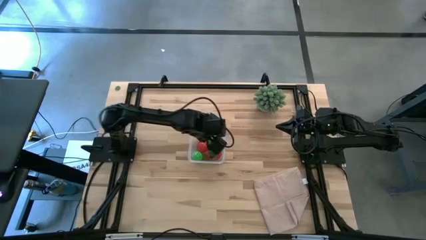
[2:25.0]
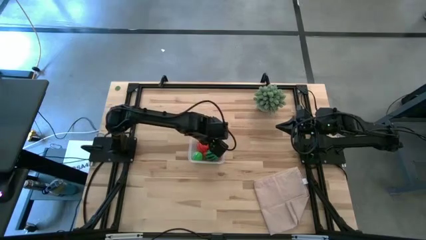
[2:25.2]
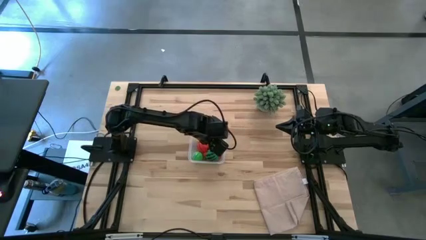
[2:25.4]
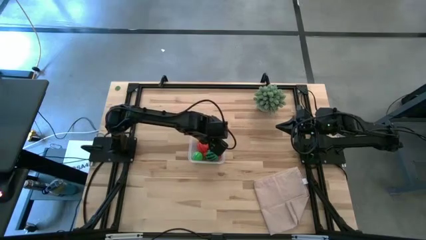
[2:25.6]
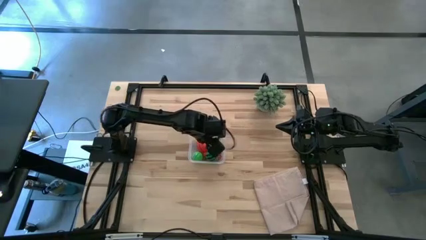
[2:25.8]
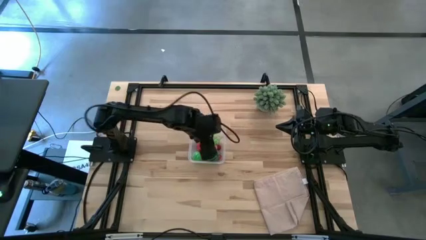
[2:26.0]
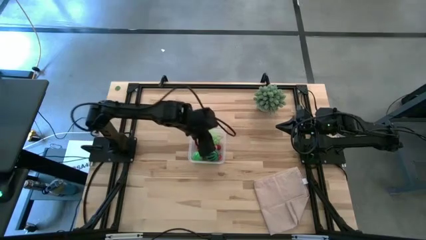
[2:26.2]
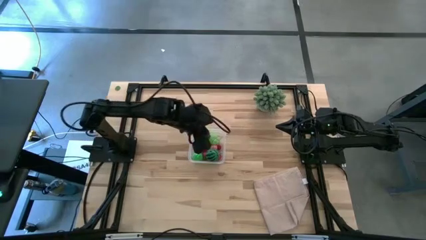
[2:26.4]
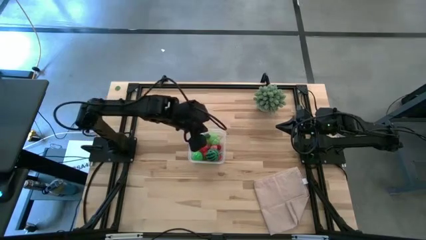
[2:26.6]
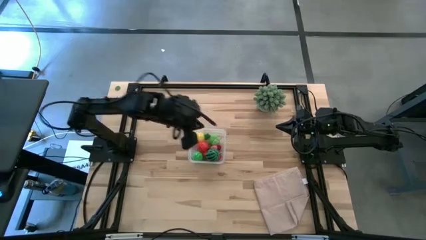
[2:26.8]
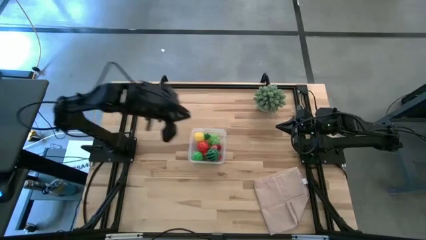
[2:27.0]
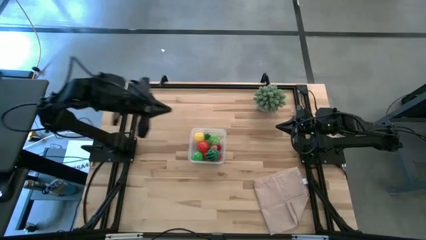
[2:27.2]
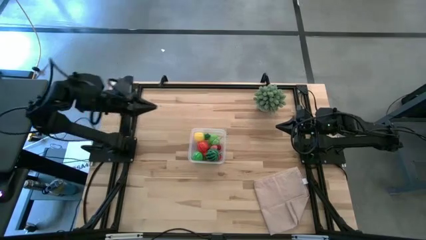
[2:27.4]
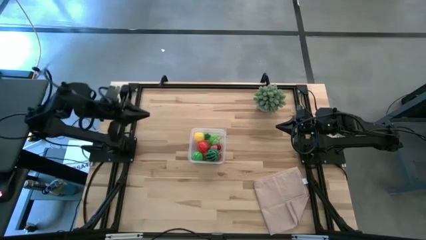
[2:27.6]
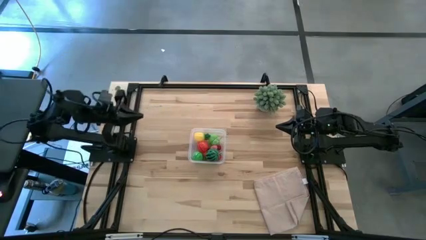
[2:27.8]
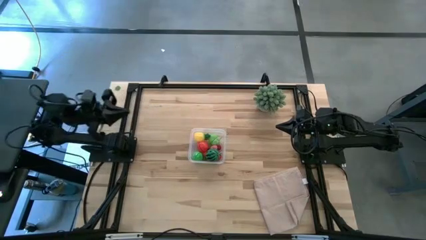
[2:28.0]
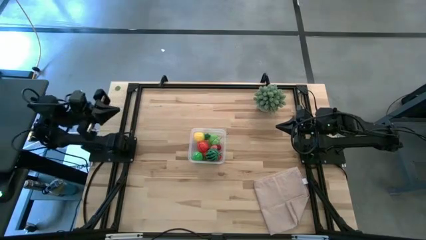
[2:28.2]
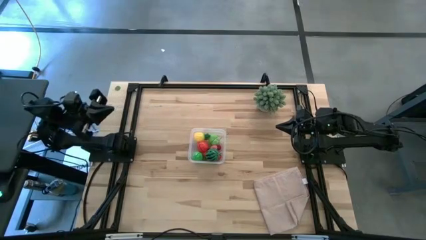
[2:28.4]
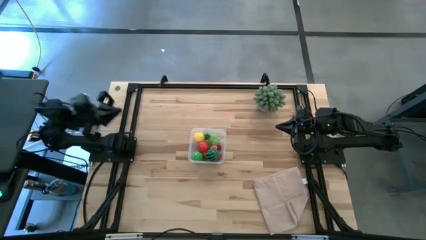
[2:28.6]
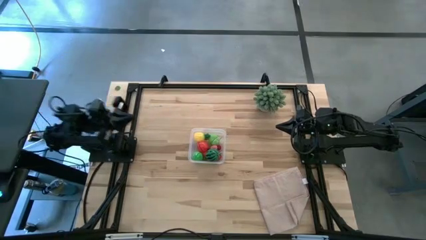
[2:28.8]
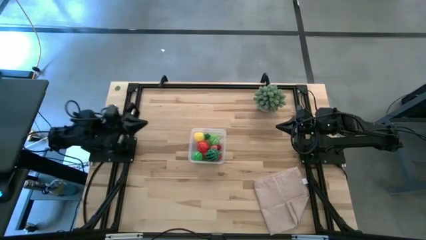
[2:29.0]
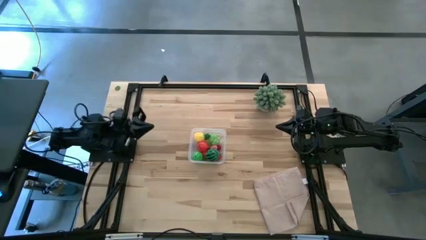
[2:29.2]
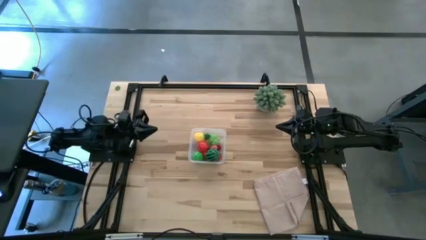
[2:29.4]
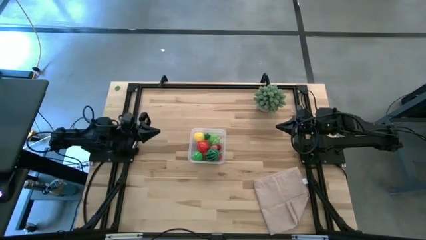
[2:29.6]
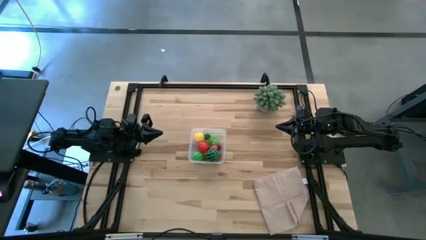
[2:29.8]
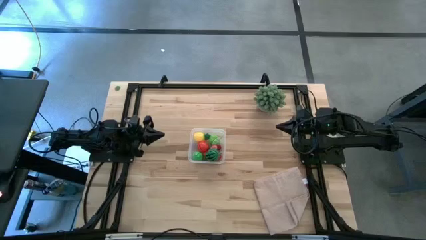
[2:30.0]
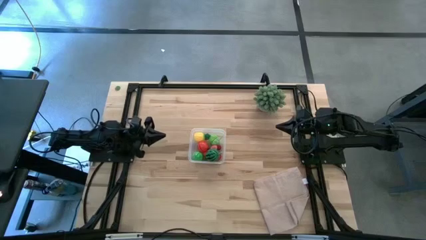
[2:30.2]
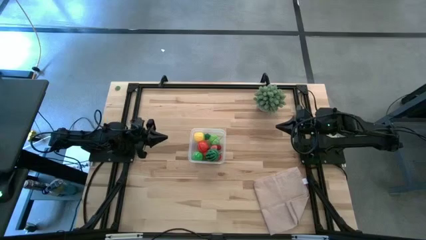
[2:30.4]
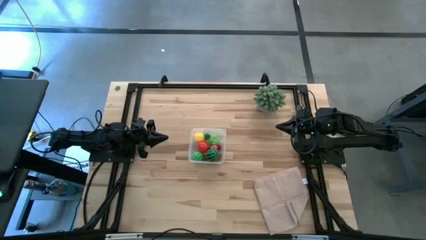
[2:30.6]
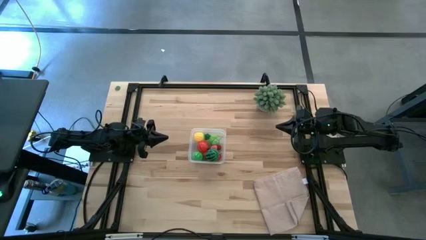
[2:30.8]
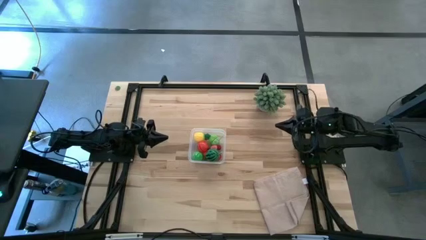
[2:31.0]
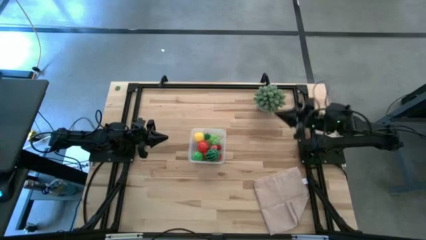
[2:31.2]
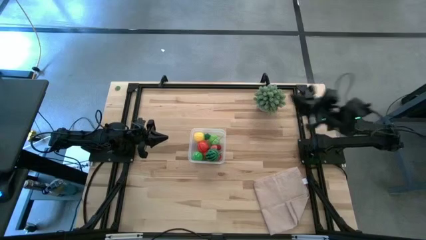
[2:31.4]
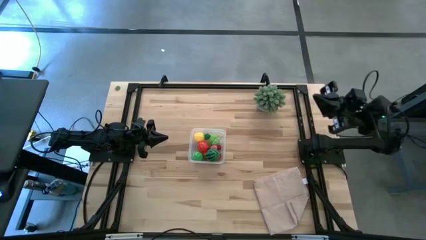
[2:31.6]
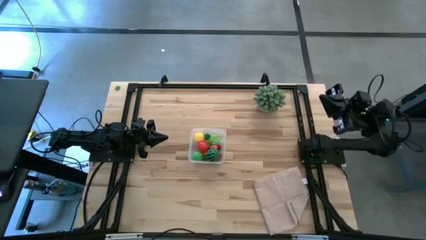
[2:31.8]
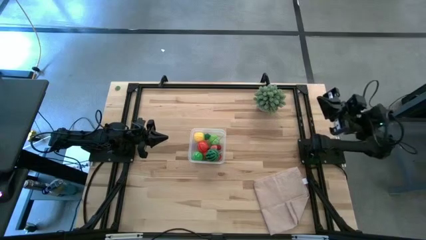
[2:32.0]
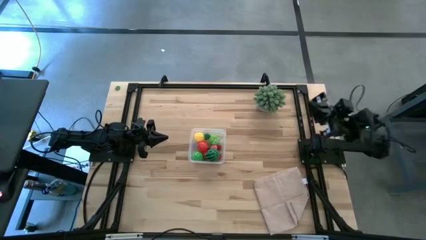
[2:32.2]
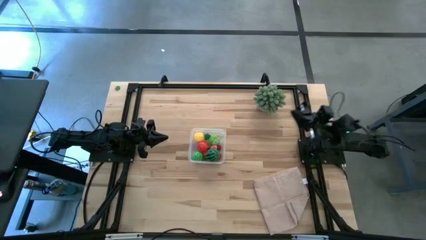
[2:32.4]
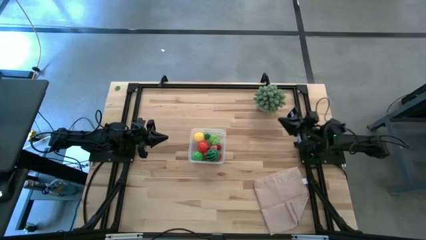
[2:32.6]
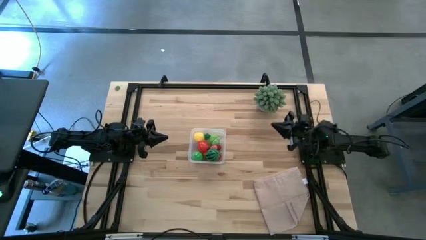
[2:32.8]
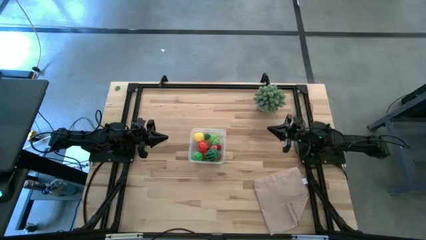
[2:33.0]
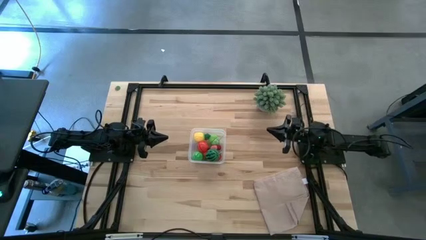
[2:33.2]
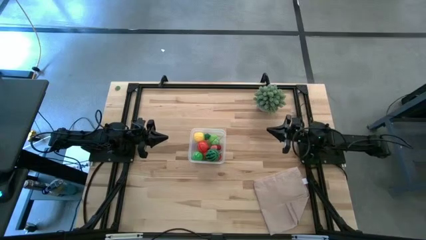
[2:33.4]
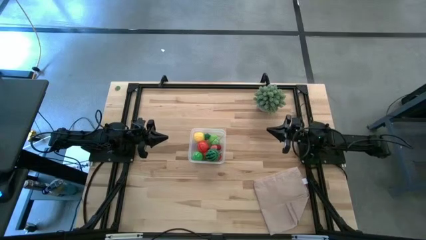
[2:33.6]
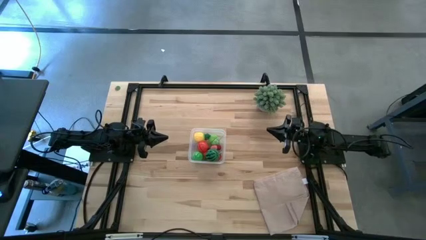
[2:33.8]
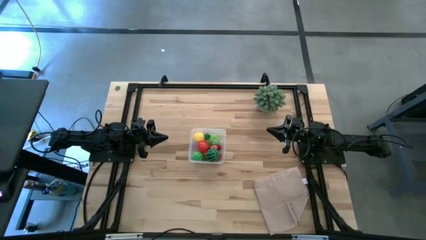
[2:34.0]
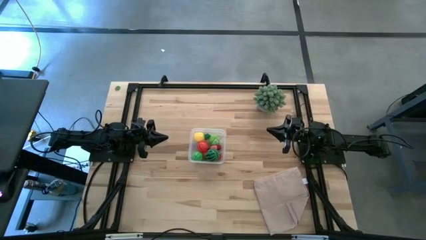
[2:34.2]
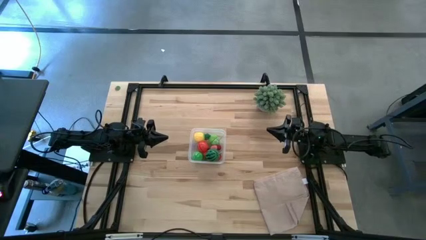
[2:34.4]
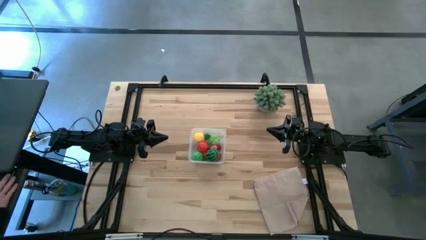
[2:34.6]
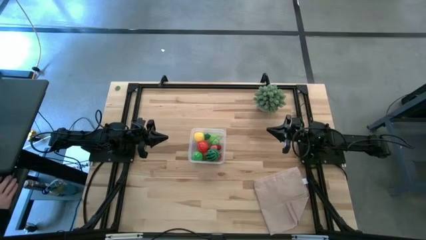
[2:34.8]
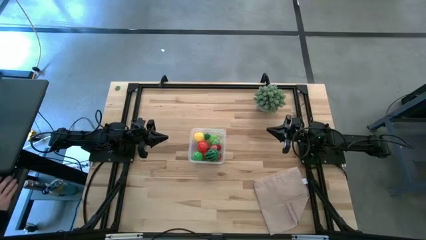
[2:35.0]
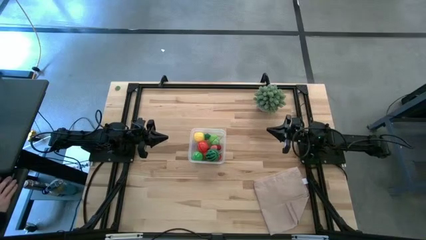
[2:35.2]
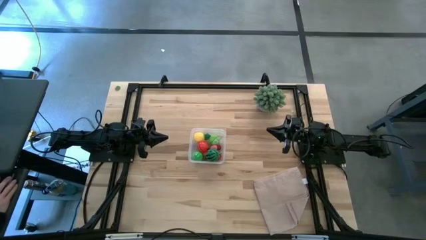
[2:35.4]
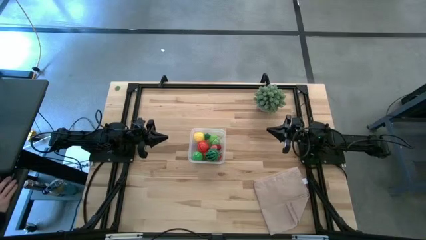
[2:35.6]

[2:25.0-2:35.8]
Task: Pick and placing Produce into tupperware
Return to Home Position

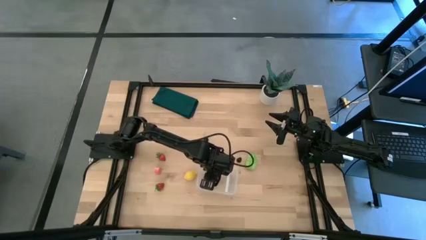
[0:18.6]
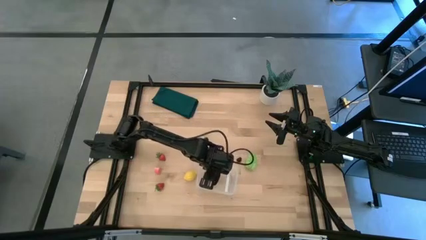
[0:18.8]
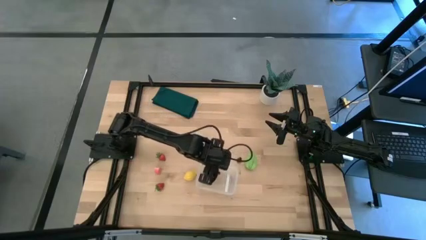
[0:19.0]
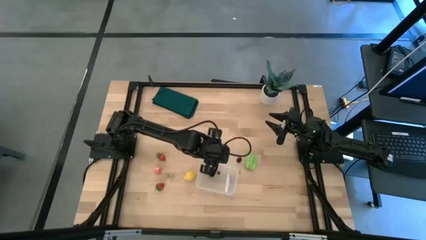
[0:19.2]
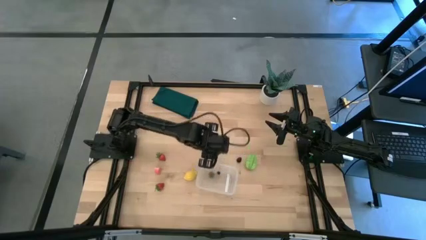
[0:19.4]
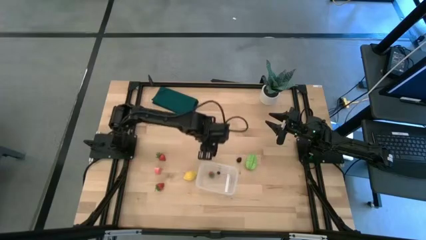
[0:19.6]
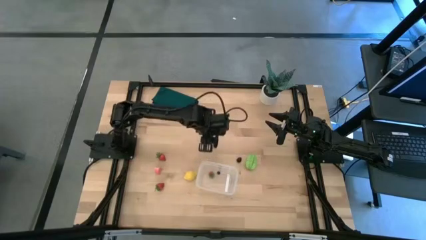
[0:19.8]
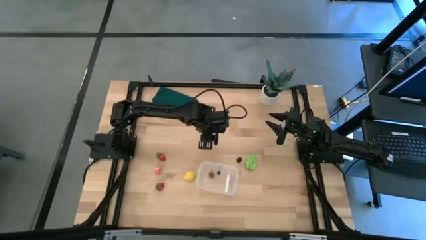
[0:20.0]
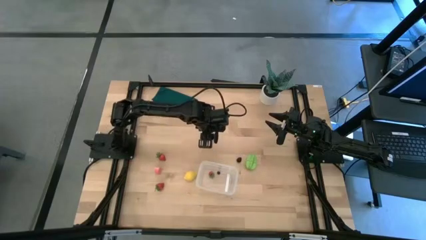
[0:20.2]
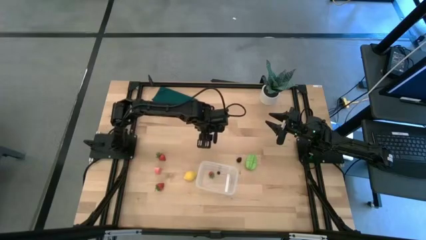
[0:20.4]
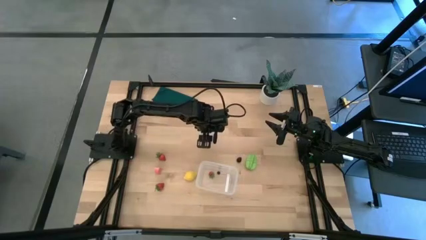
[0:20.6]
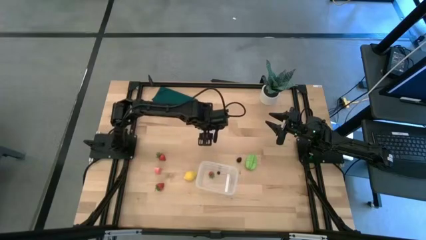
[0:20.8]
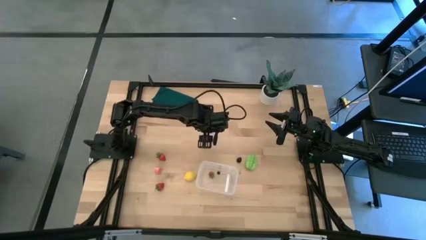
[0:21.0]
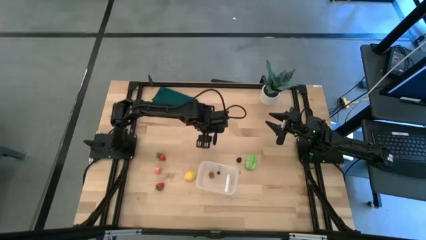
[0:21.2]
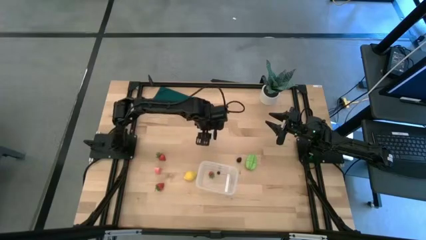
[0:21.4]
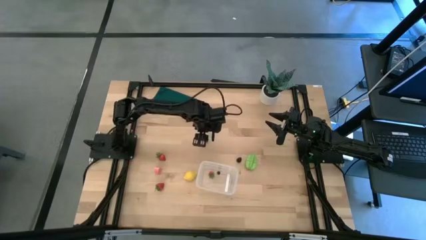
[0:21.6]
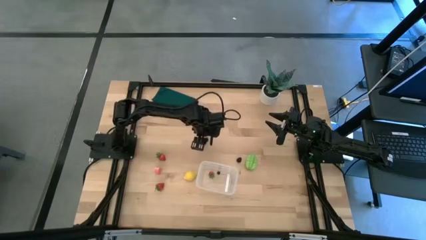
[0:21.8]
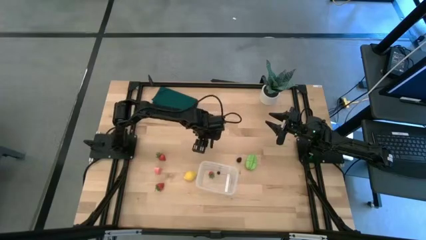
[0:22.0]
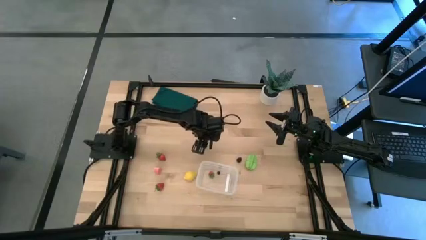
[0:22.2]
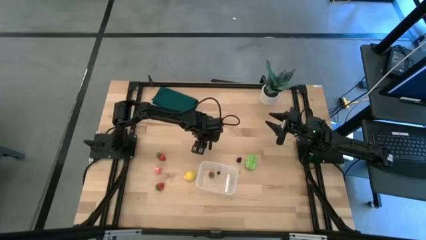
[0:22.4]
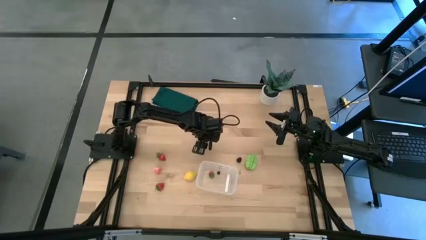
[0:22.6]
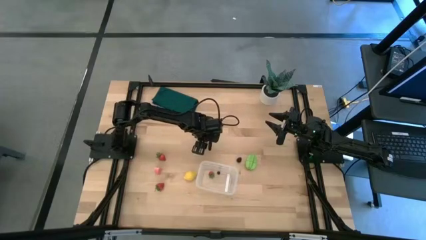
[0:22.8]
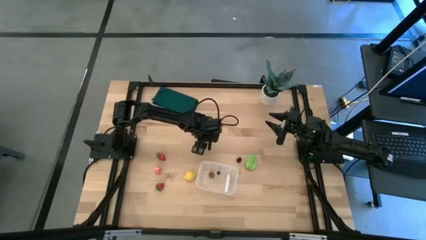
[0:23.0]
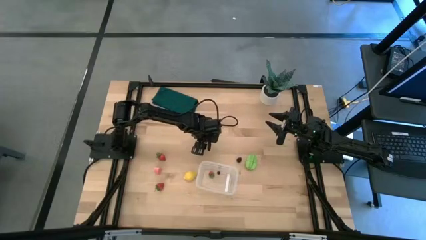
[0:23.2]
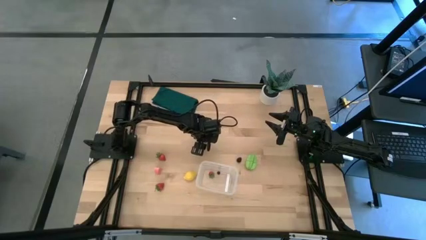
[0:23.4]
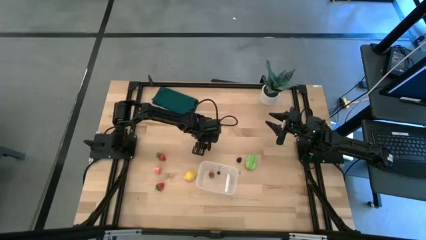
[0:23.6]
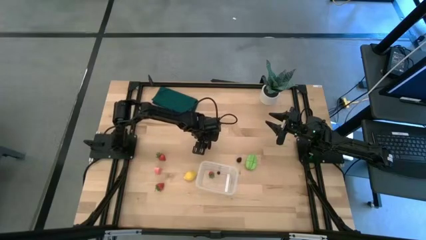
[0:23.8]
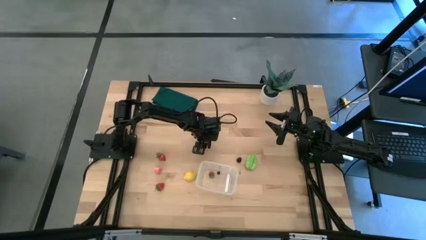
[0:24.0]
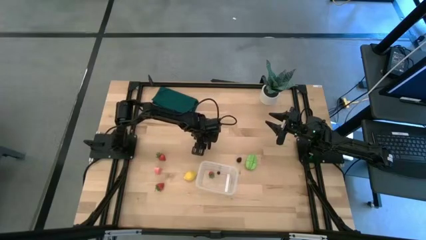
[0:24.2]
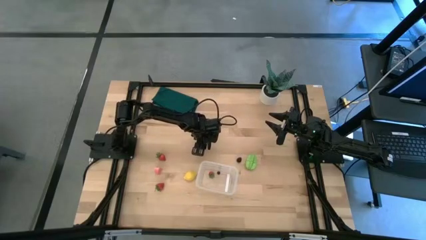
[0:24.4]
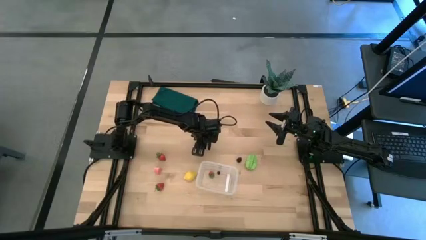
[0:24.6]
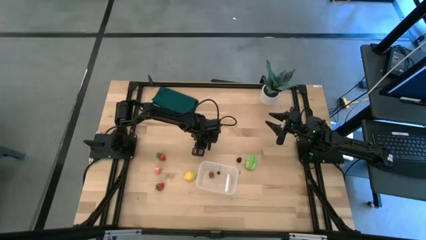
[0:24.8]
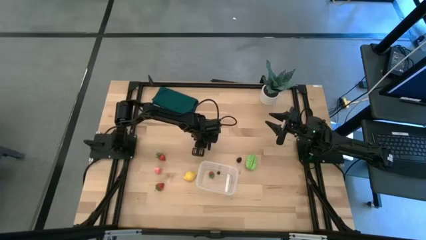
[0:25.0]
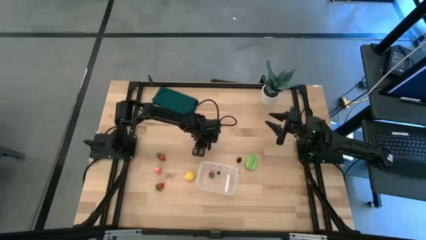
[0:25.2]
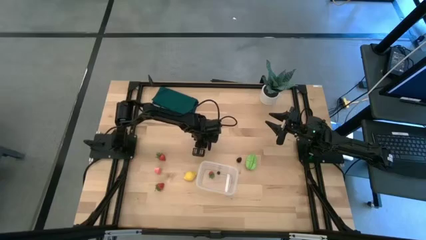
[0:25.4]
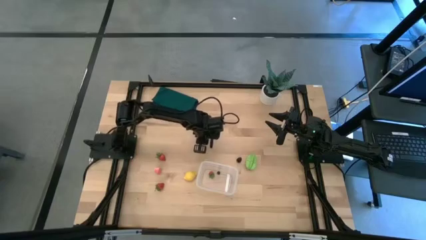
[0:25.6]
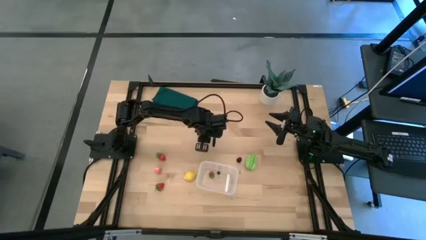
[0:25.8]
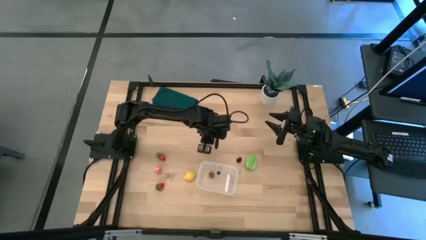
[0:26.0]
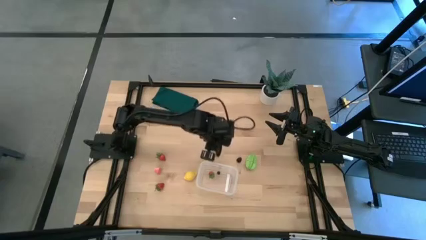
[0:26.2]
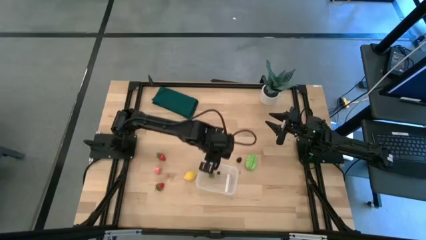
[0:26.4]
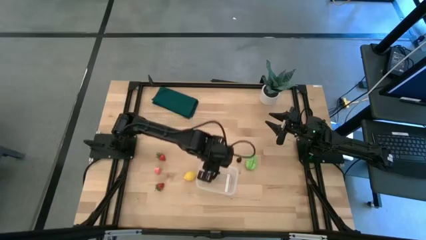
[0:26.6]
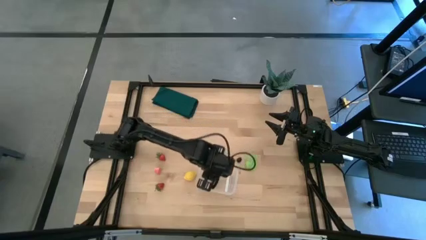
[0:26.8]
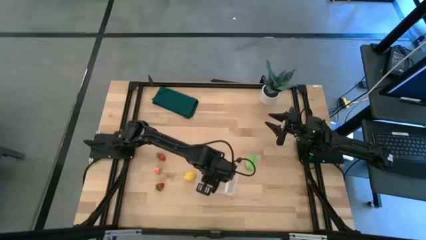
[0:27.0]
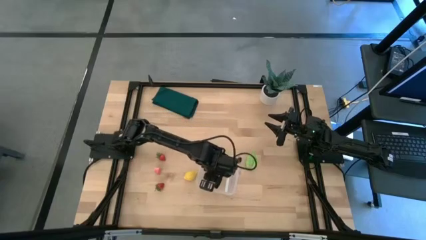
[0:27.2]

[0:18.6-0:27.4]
Task: Pick and placing Produce into tupperware
Put the cherry into the transparent bin
